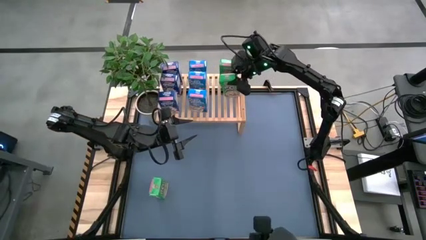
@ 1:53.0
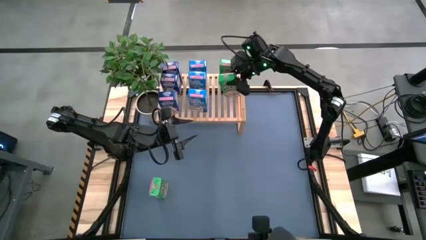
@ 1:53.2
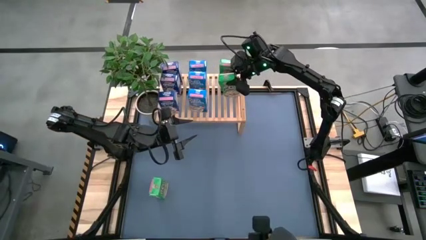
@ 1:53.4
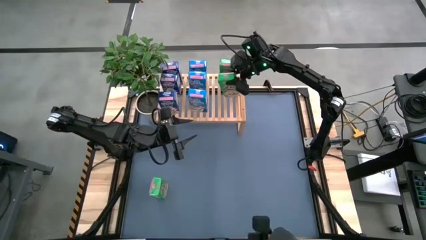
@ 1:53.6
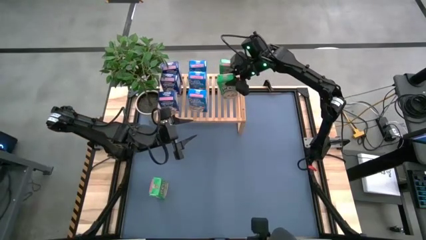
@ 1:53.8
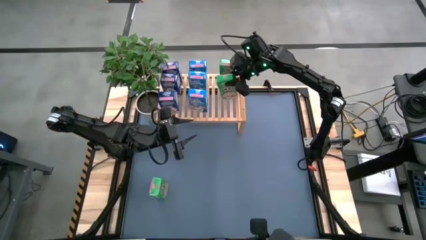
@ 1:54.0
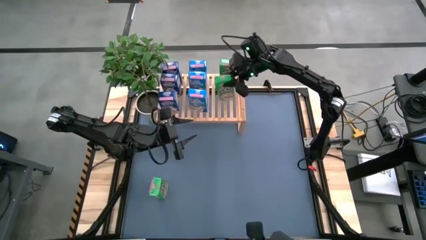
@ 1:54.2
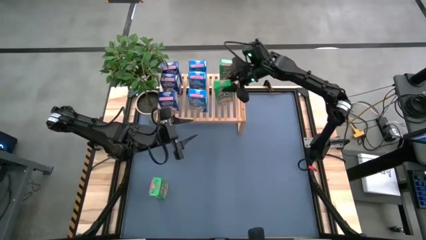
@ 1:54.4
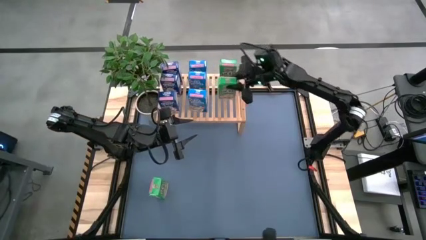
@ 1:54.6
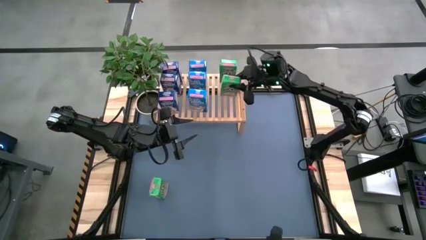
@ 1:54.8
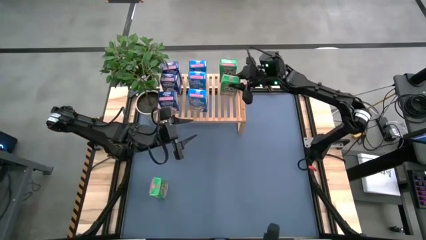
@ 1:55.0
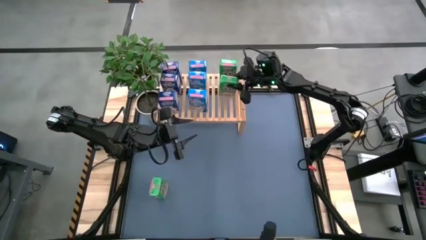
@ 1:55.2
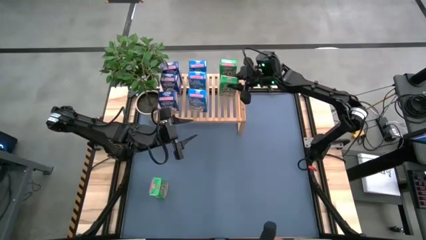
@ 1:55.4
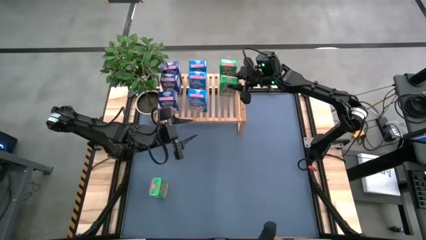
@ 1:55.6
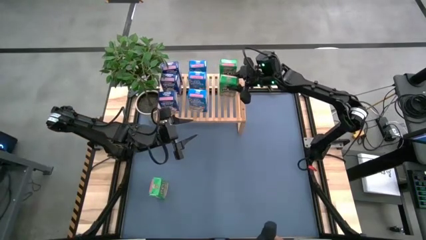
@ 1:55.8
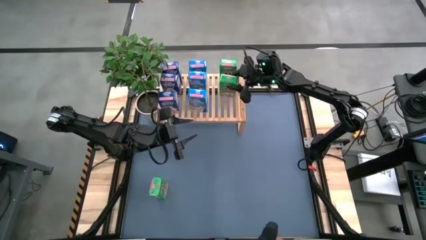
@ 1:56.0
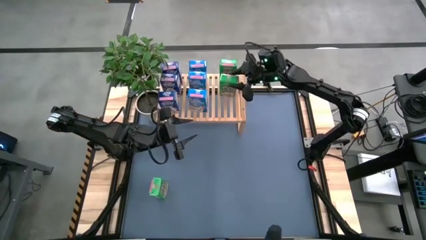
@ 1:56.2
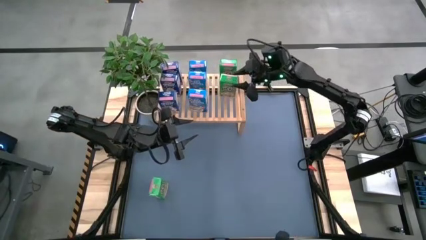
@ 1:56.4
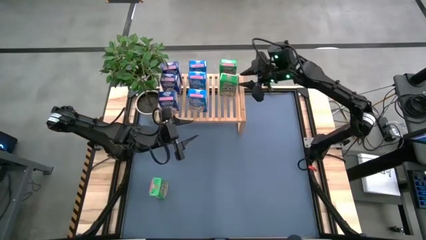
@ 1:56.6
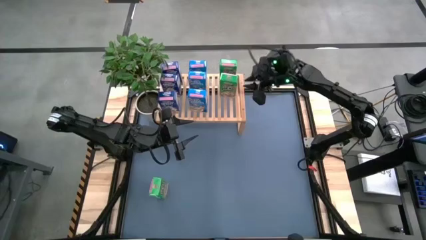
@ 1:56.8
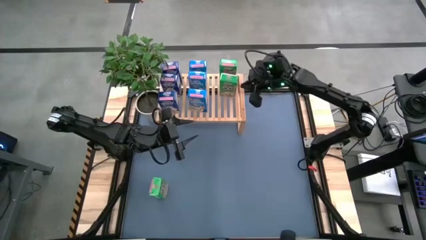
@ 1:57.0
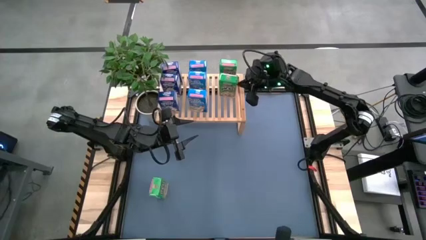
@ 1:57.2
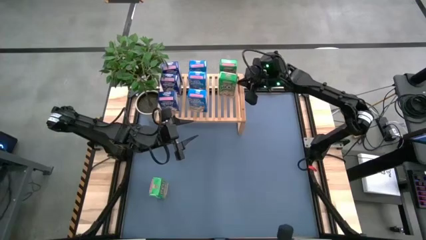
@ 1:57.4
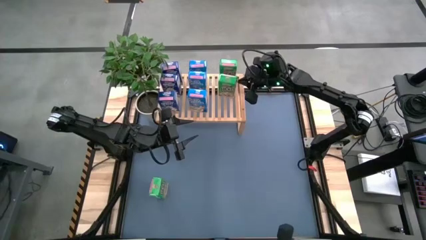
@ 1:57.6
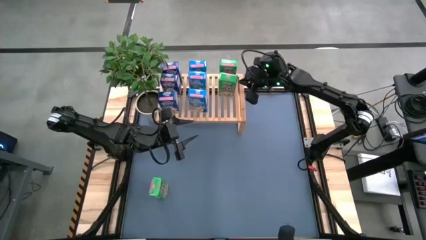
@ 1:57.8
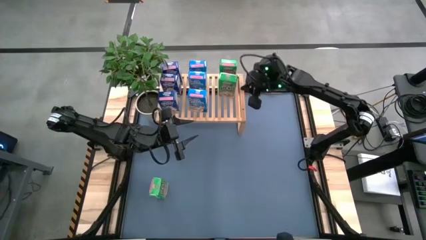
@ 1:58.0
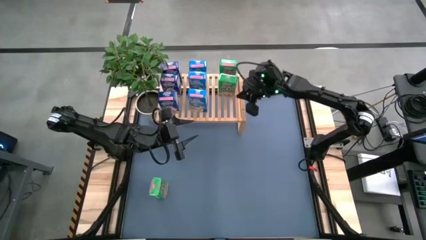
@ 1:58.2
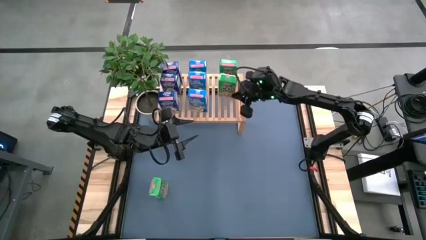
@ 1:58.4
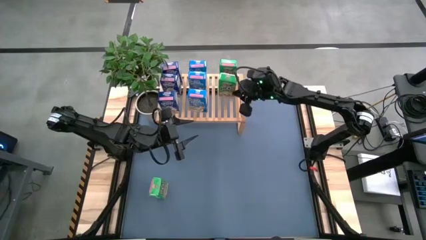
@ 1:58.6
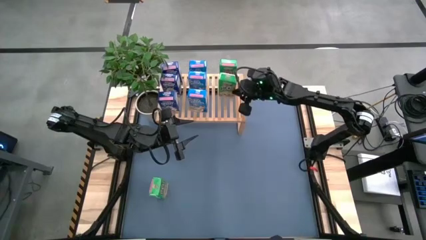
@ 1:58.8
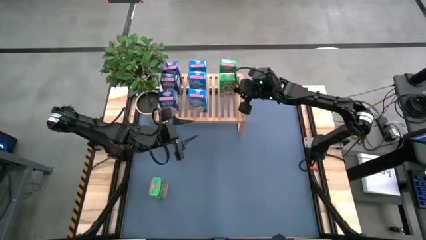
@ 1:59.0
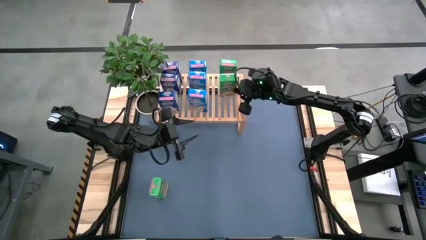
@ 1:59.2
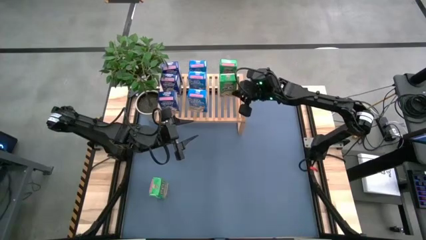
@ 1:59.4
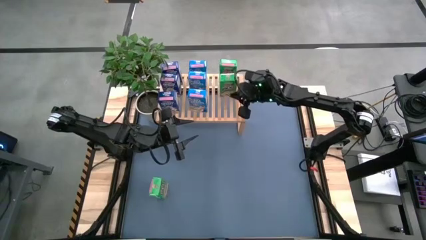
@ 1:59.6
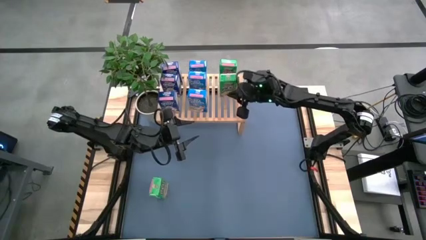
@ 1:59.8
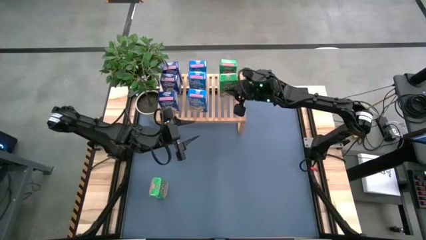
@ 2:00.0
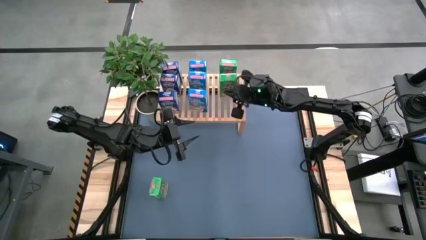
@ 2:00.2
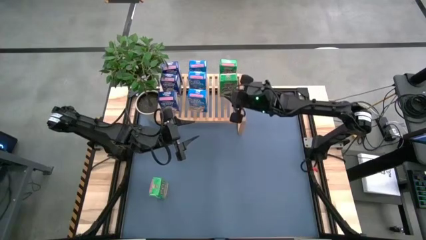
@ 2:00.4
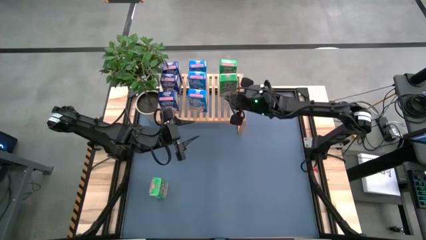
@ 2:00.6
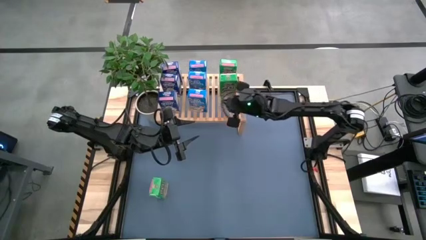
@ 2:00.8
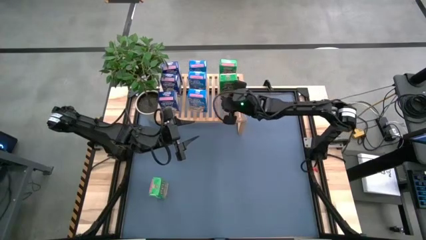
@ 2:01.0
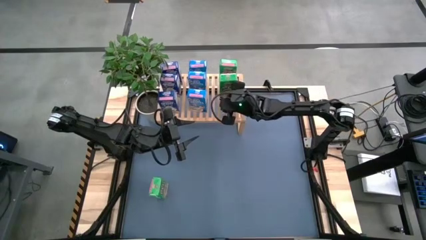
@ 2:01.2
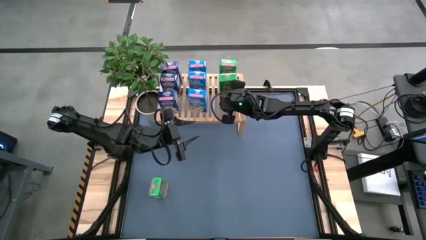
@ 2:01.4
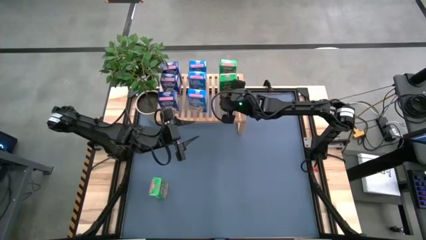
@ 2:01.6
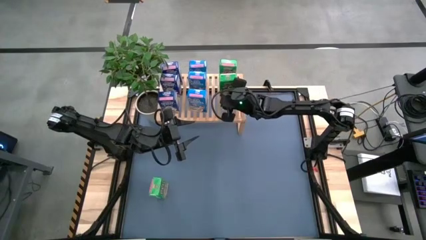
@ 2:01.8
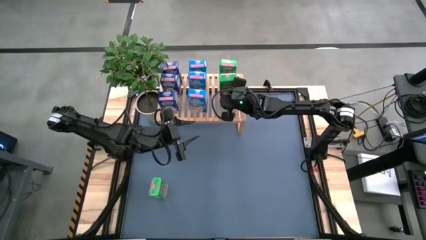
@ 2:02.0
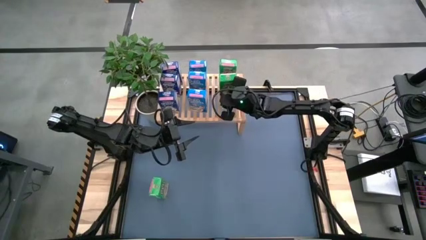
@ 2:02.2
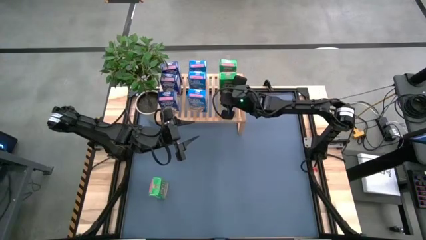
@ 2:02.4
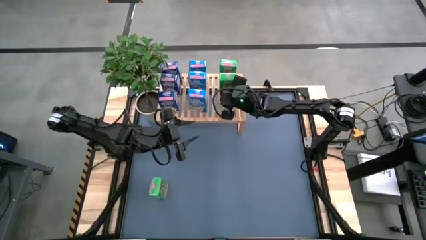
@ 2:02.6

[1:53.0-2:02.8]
Task: Stack cereal on shelf
Put the top green cereal box on the shelf aligned with the green cereal box
